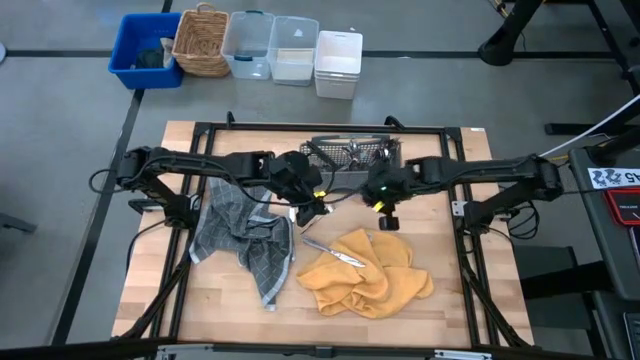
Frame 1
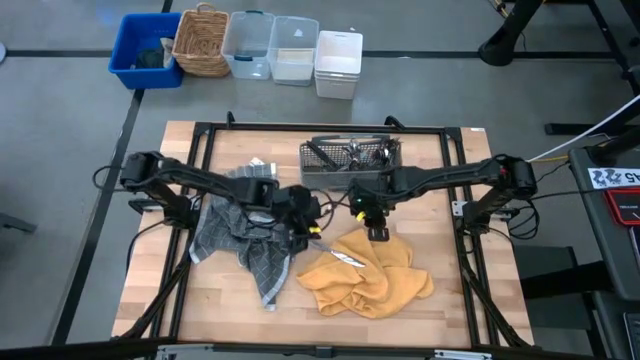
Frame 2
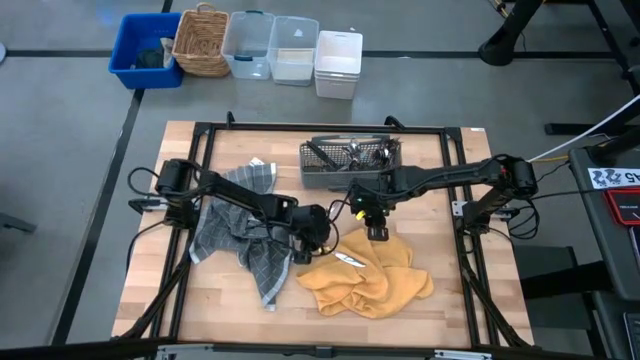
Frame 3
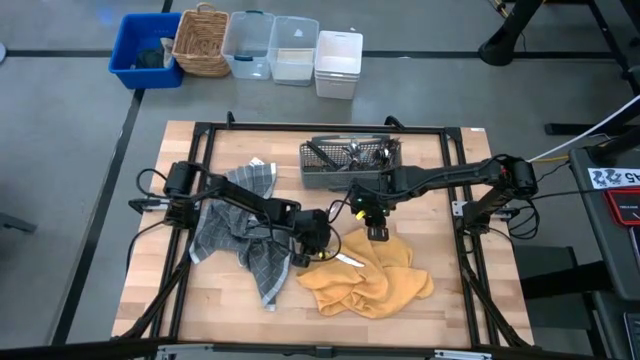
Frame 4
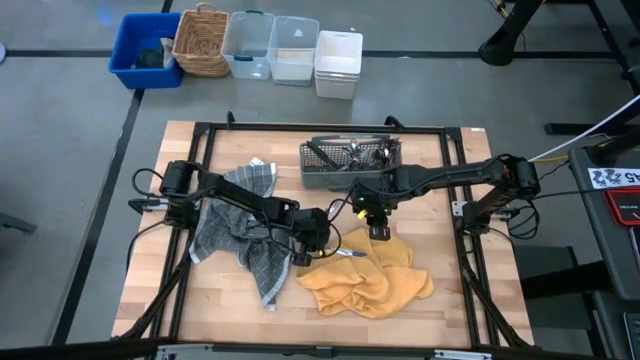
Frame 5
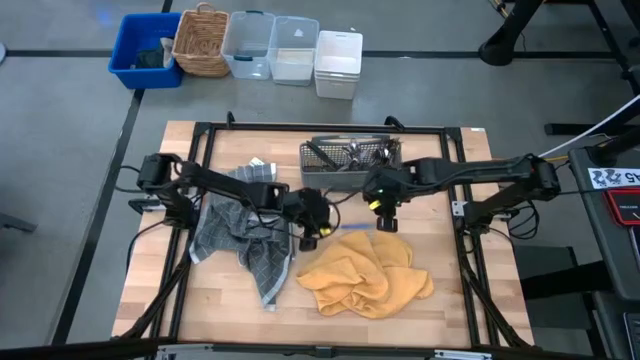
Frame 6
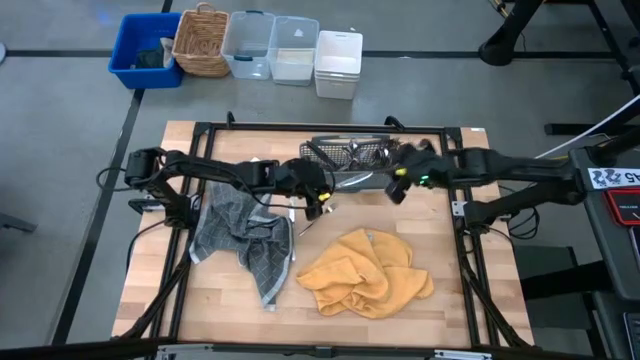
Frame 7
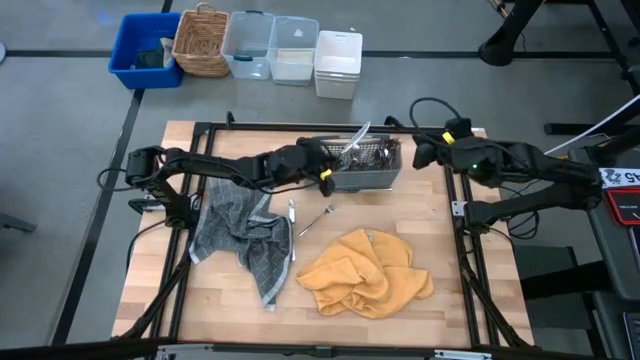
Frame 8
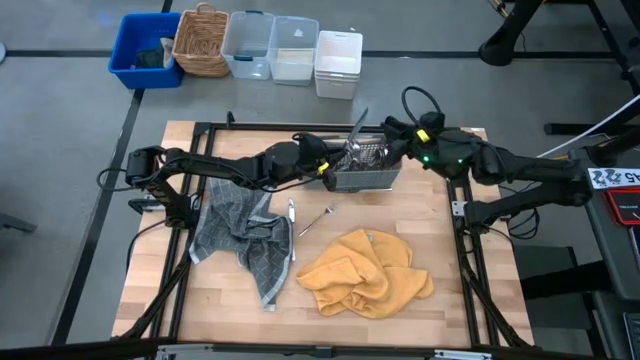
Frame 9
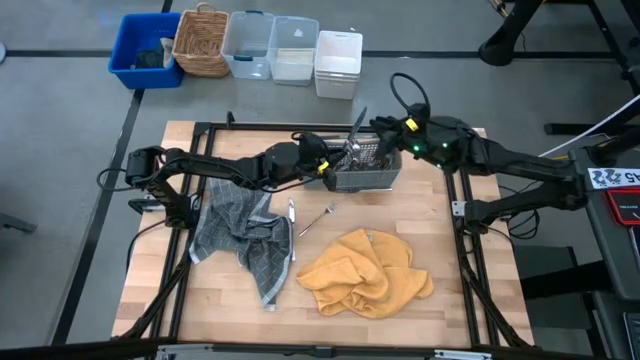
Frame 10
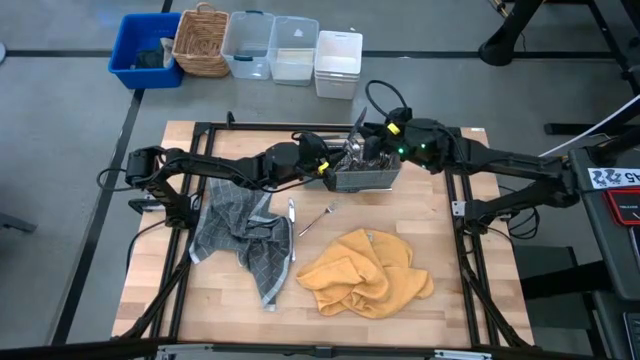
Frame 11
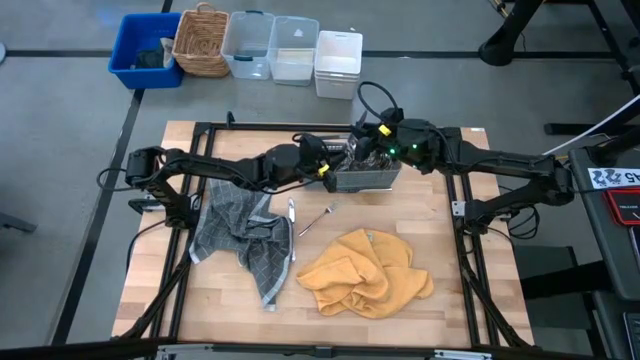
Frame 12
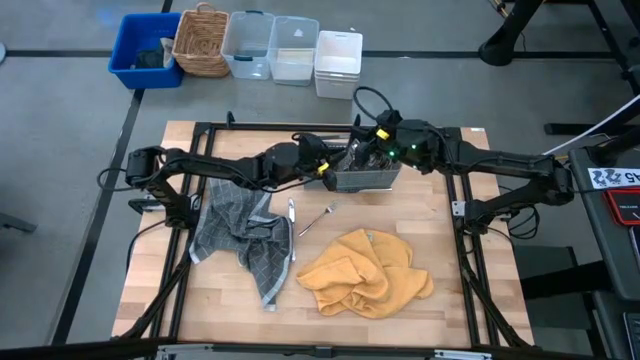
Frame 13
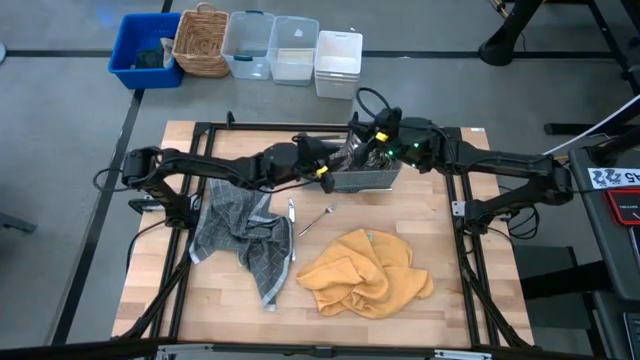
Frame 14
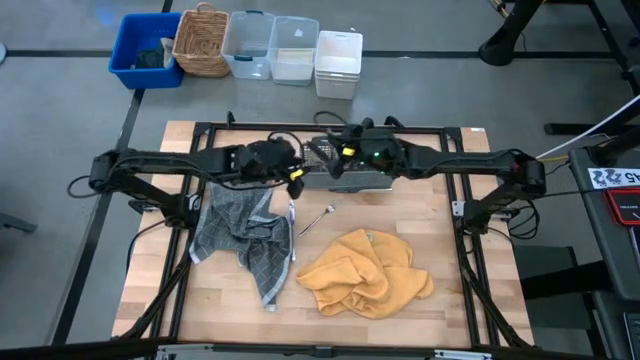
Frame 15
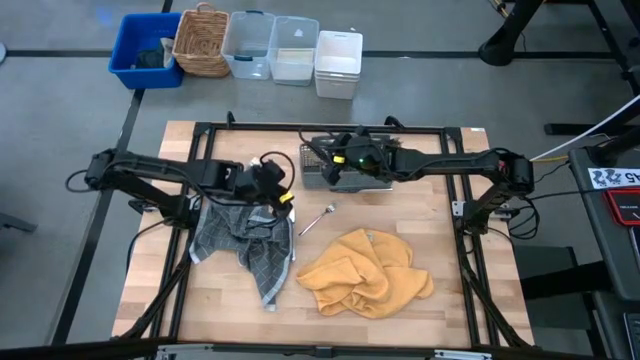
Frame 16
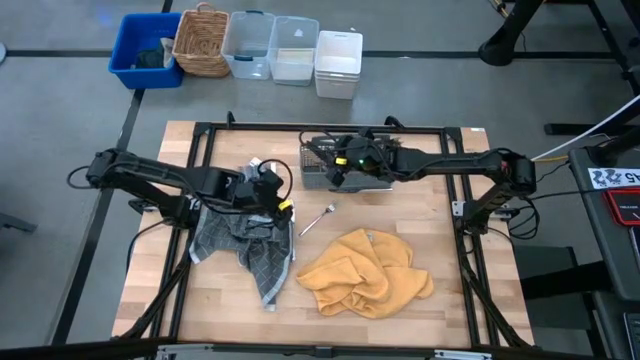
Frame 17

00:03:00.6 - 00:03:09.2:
Task: Sort silverware
Put the silver knife into the gray utensil holder

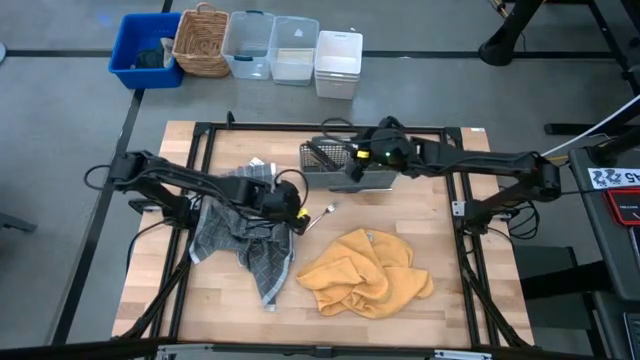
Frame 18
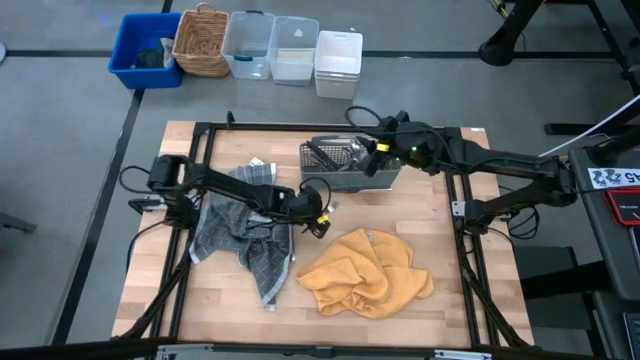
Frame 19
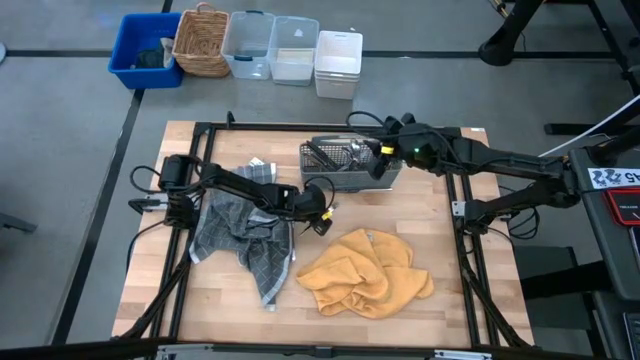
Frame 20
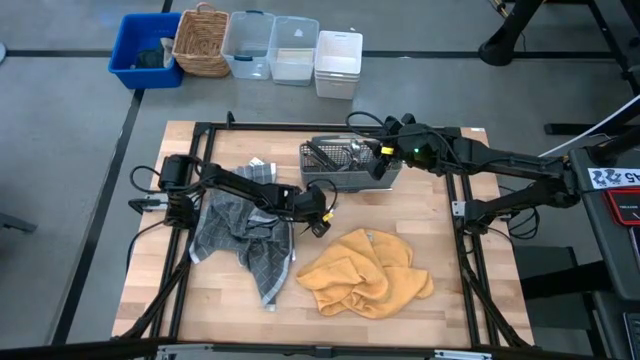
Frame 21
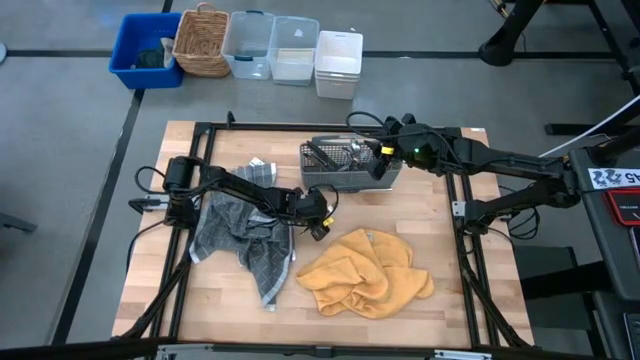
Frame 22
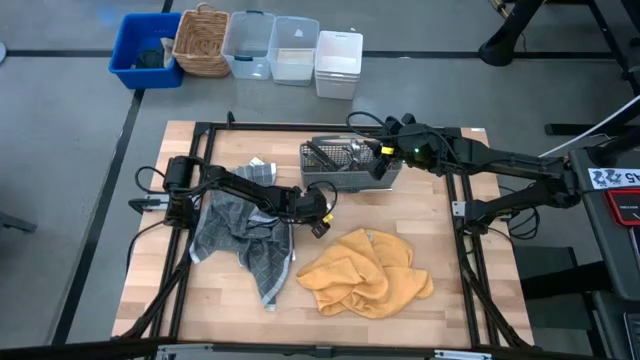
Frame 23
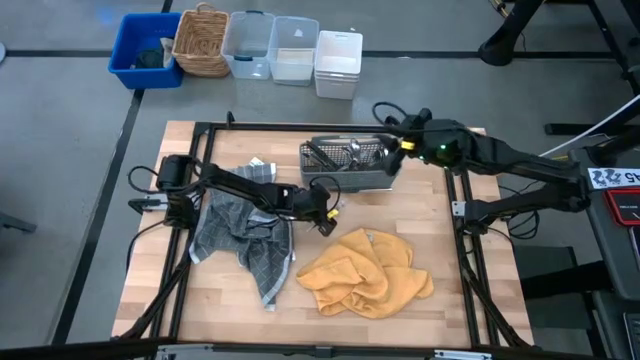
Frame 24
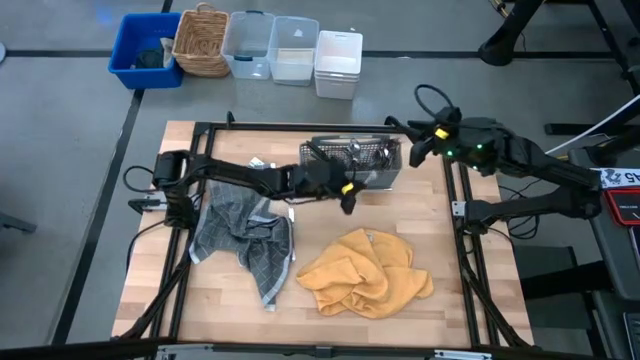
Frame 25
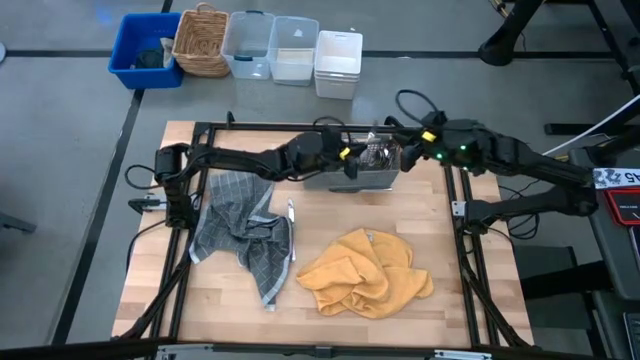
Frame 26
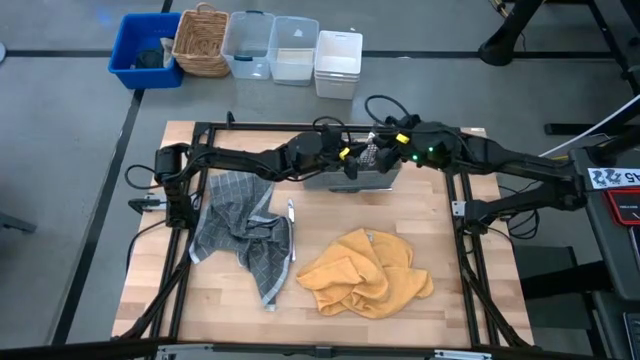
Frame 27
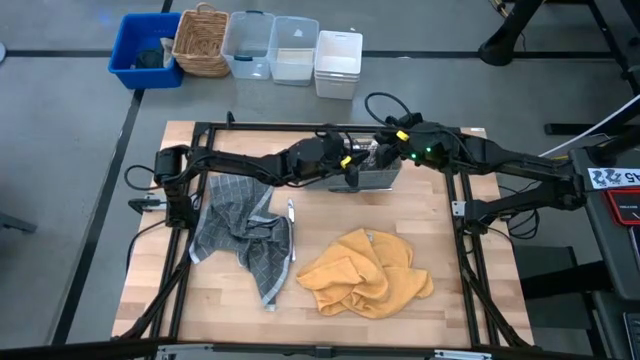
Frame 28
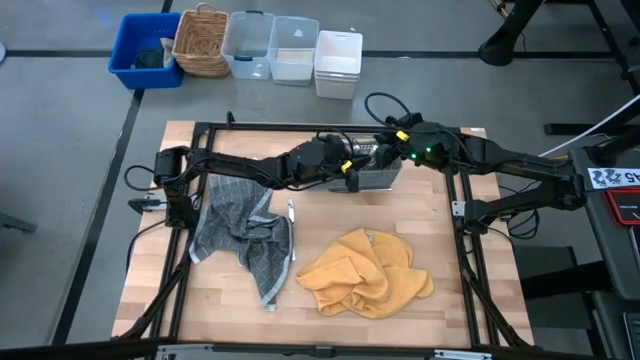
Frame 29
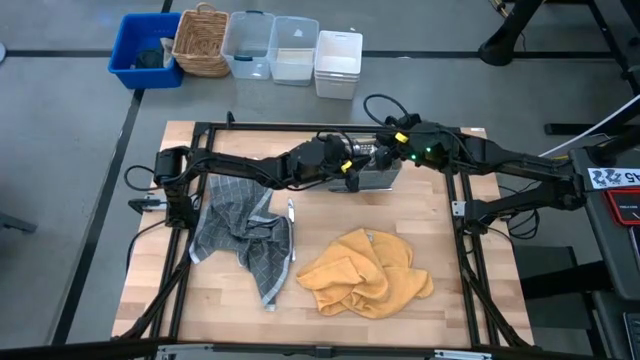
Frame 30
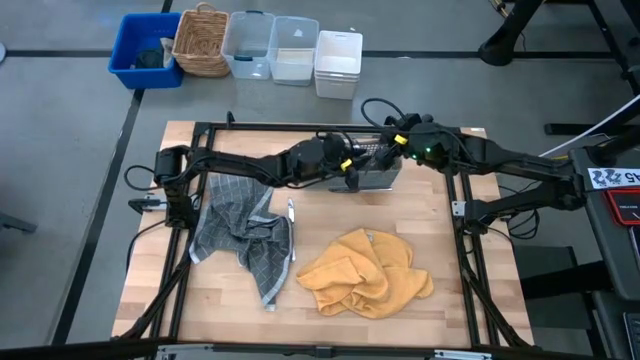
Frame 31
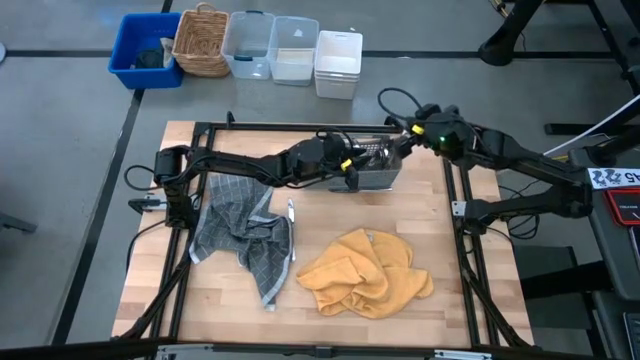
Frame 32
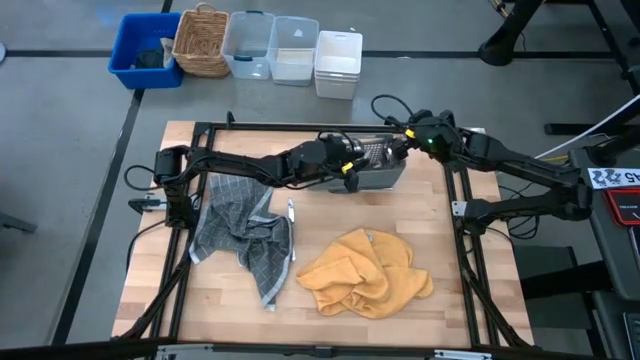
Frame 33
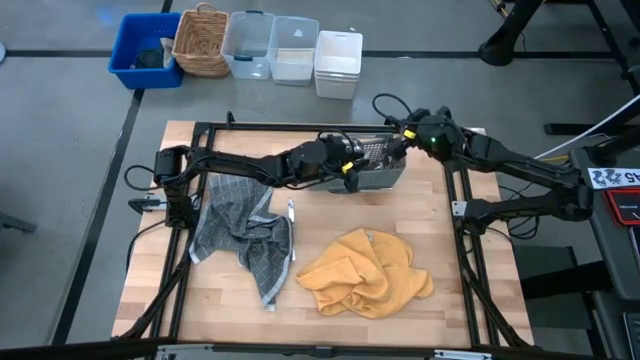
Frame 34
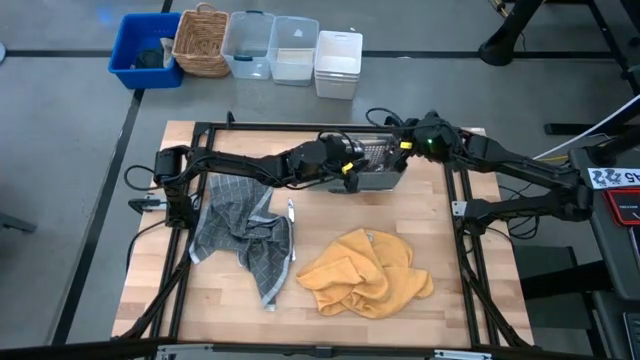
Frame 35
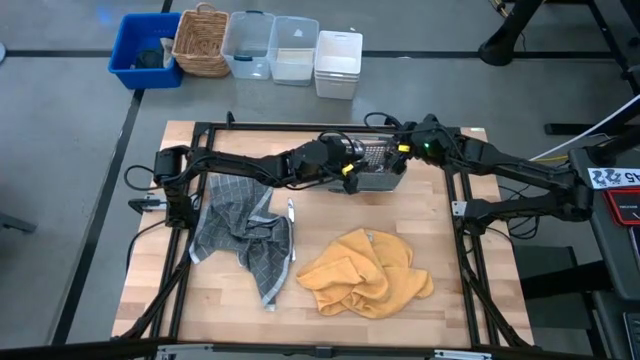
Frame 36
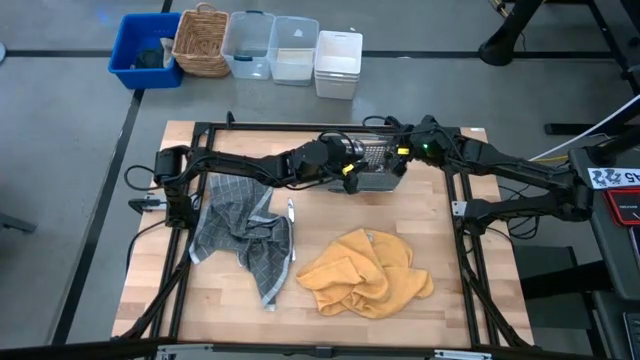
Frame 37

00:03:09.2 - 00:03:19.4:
Put the silver fork into the gray utensil holder

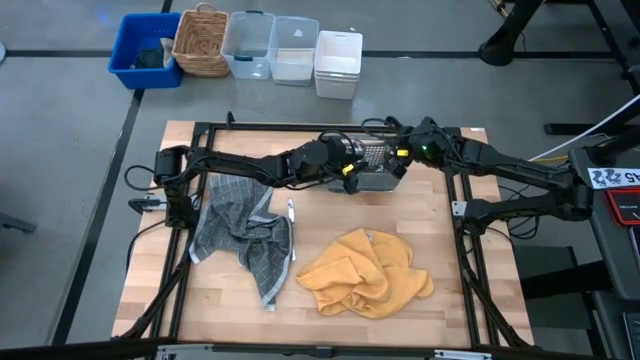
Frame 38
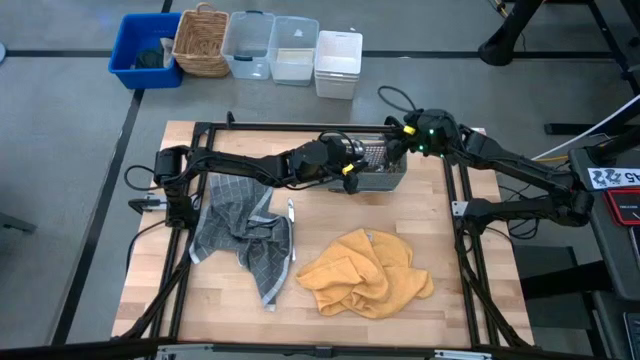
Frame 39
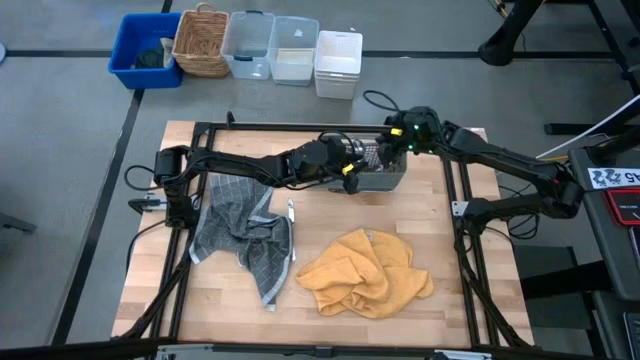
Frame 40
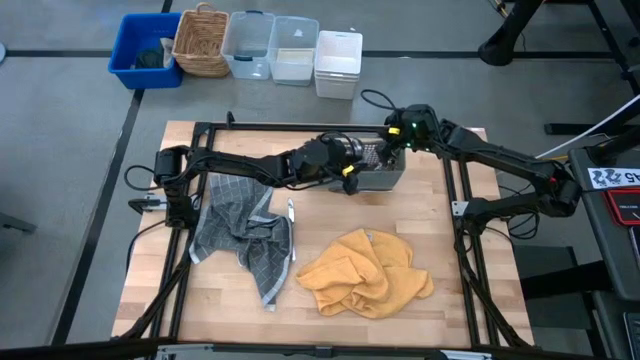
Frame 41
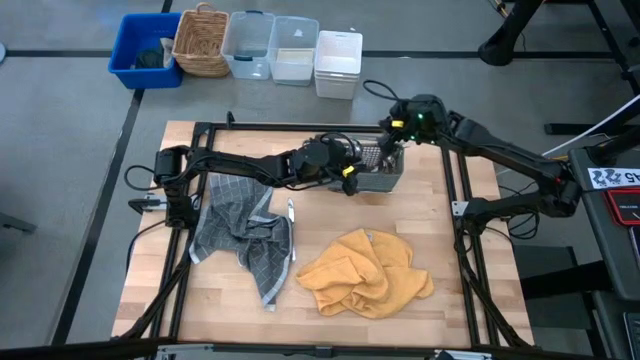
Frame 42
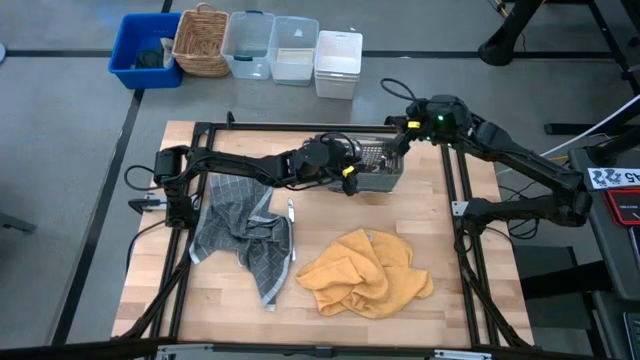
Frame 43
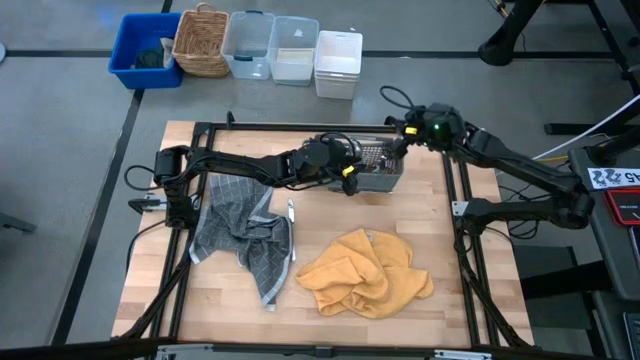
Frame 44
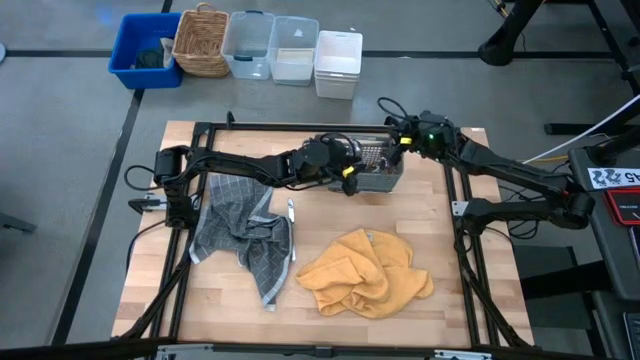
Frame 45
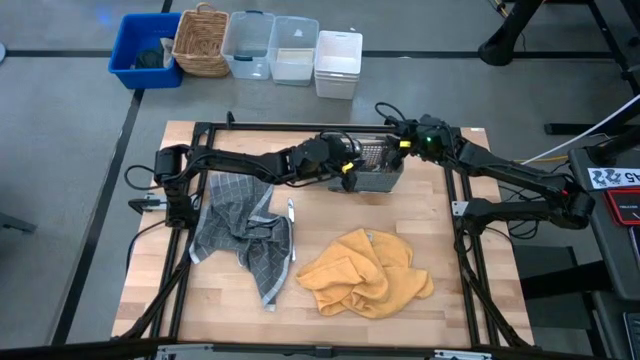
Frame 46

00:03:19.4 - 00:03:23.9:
Put the silver fork into the gray utensil holder
